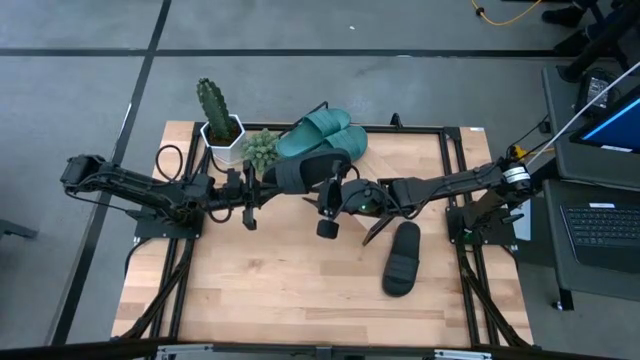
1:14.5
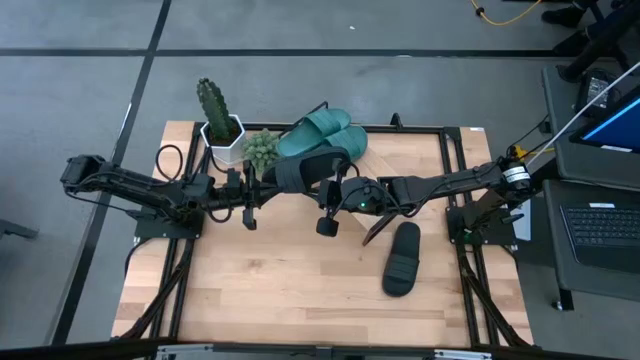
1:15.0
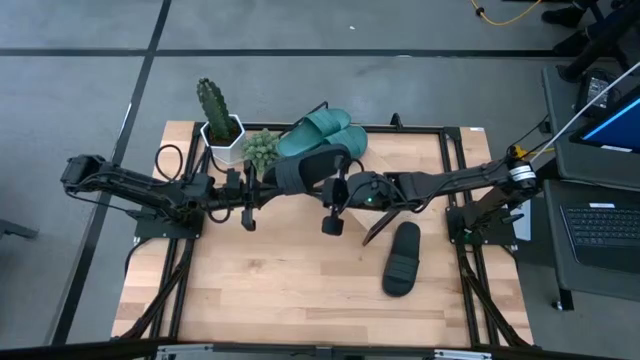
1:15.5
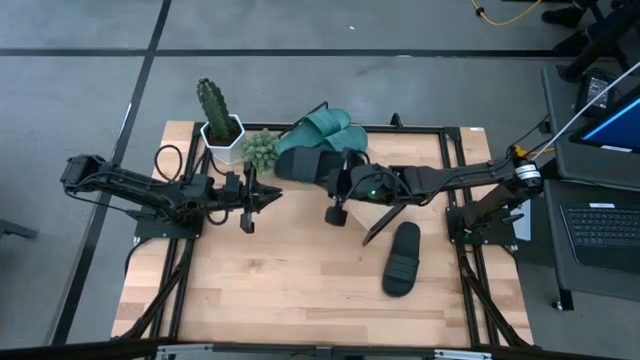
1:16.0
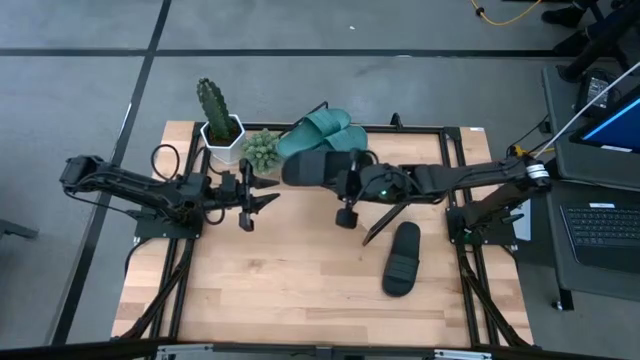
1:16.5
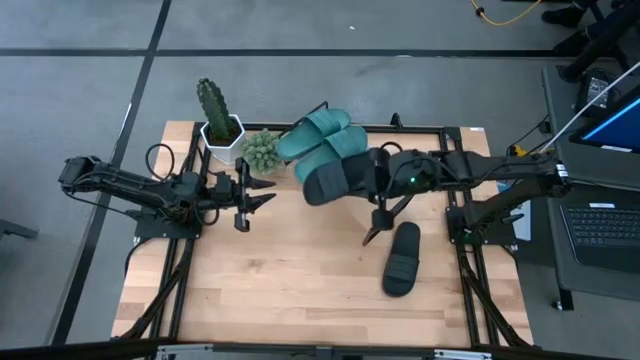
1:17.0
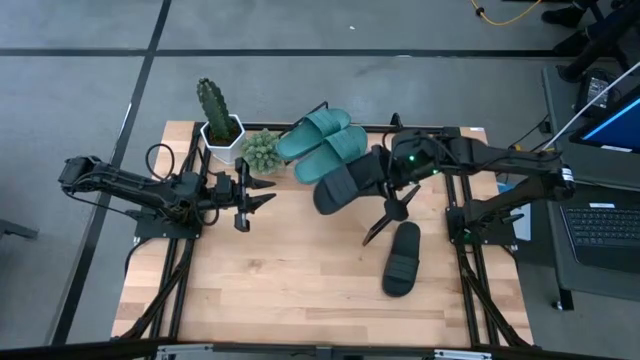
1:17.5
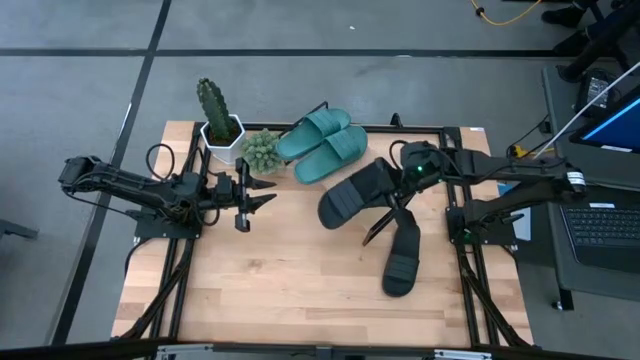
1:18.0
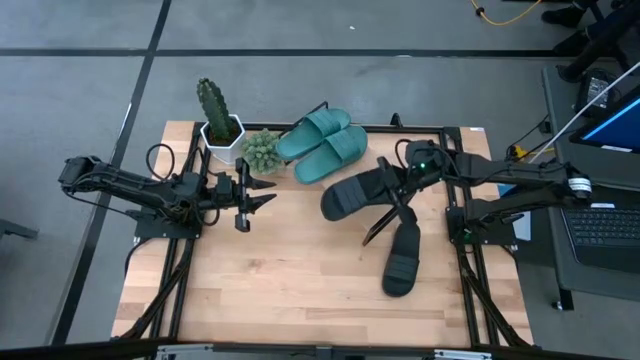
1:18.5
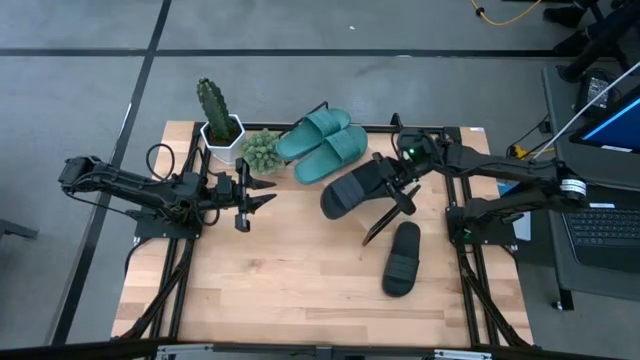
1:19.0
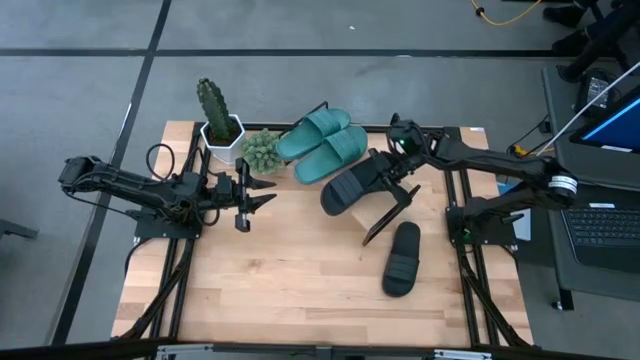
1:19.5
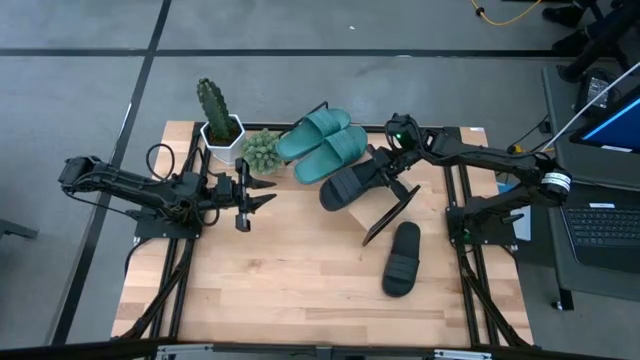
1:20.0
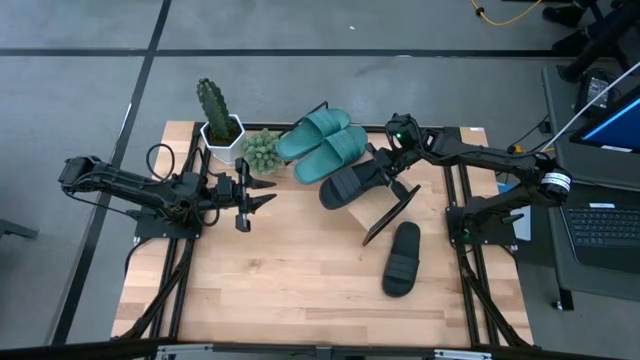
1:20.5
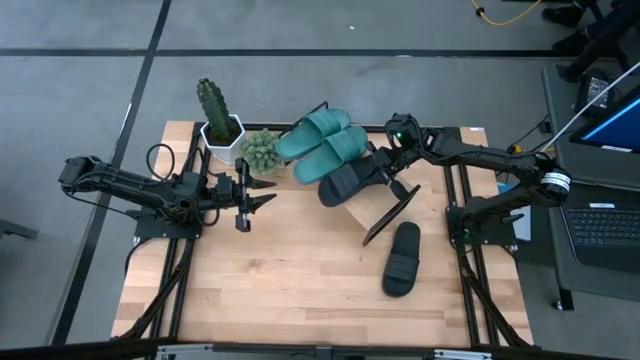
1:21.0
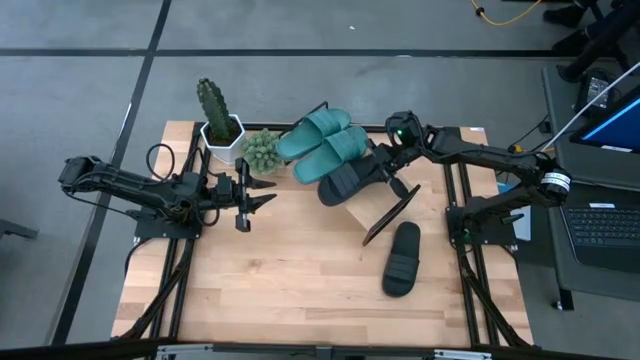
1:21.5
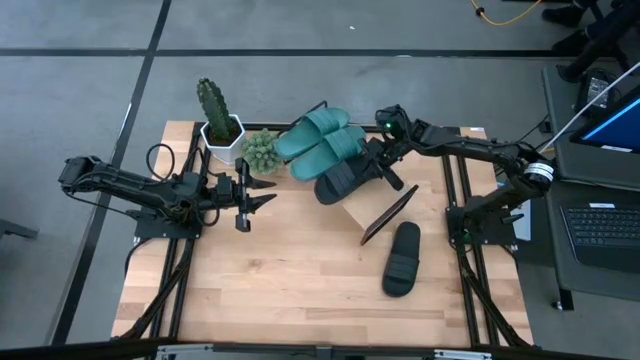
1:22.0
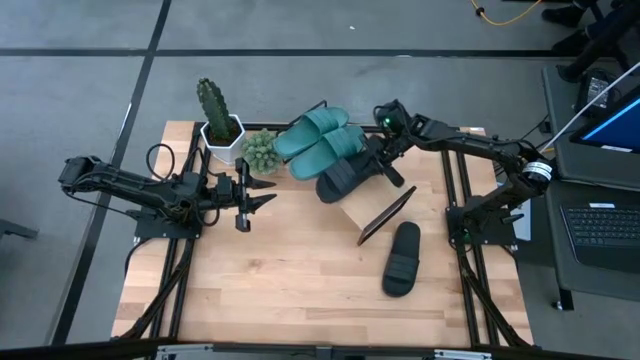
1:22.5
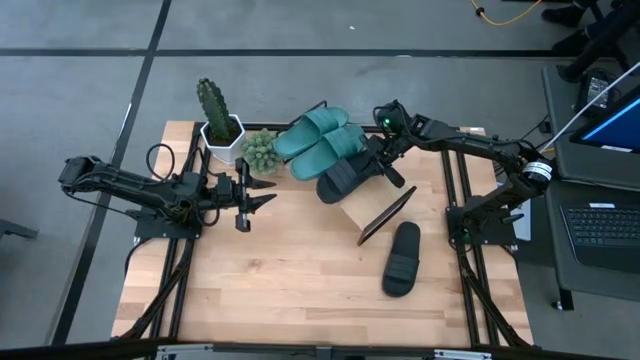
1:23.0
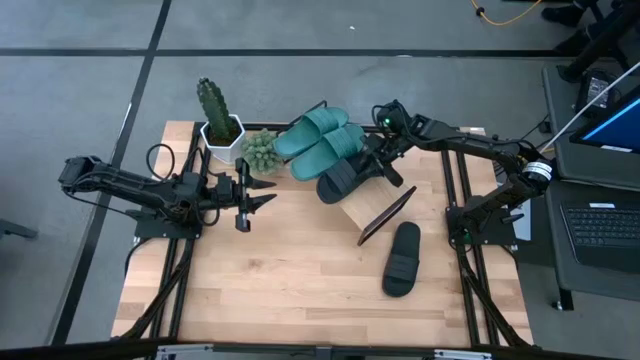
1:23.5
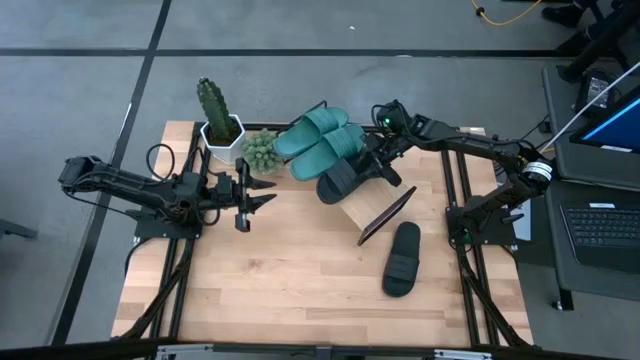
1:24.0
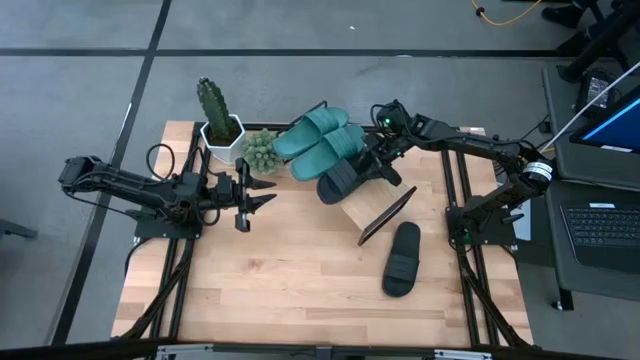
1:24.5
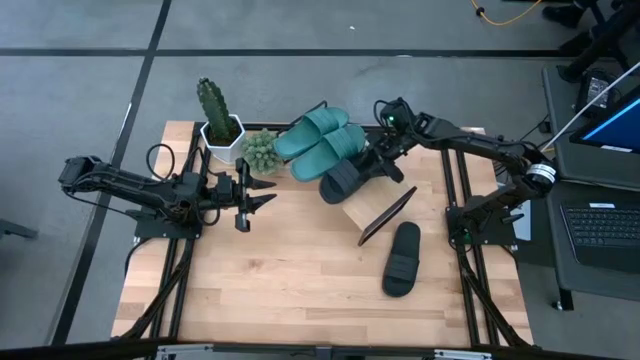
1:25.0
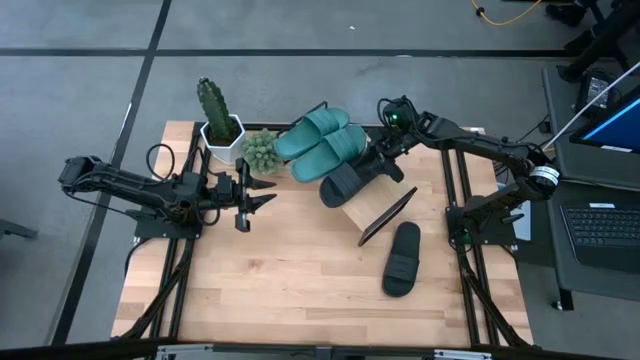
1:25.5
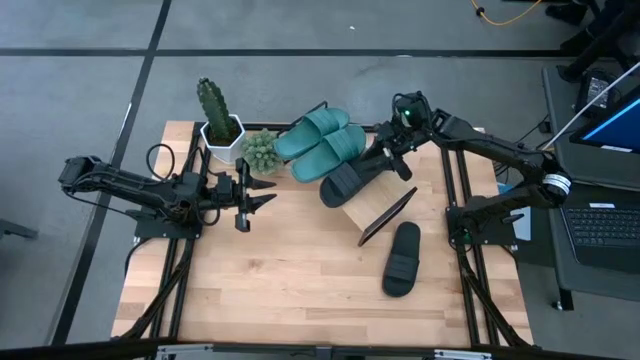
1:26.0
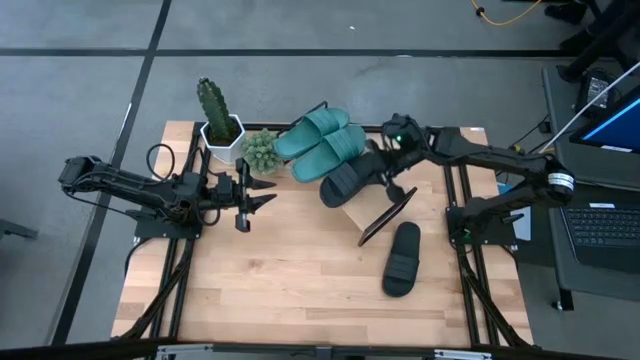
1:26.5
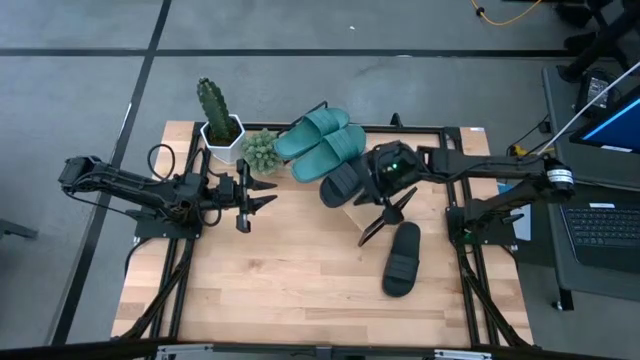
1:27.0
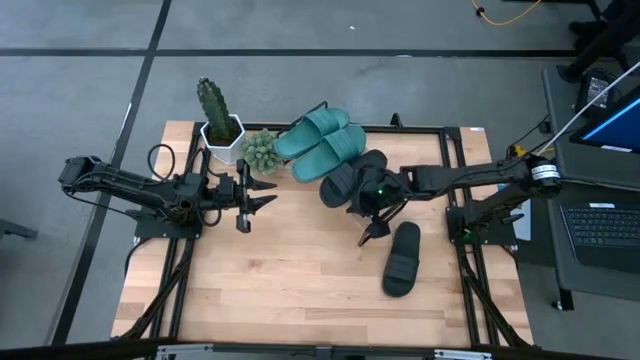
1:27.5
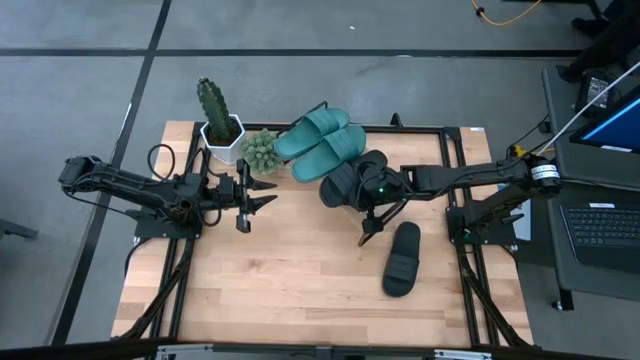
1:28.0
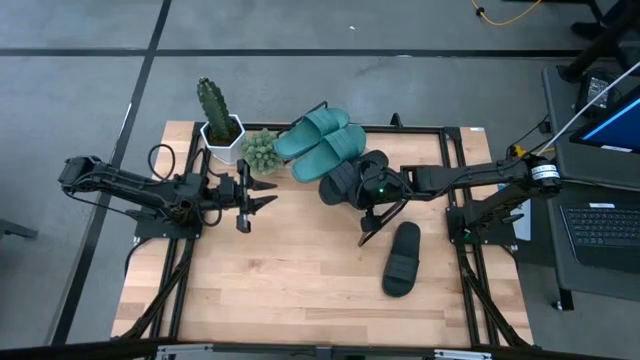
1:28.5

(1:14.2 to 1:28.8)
Task: Pick and place slides into the shelf
Put the top black slides on the shelf

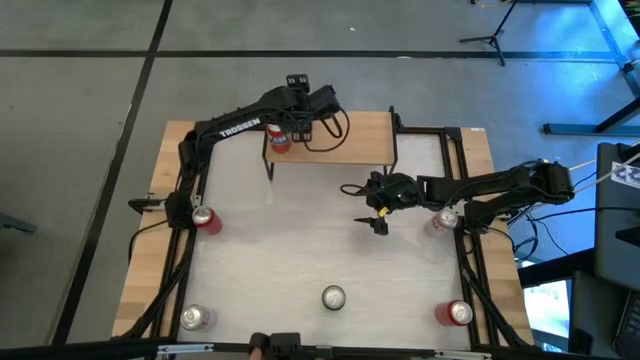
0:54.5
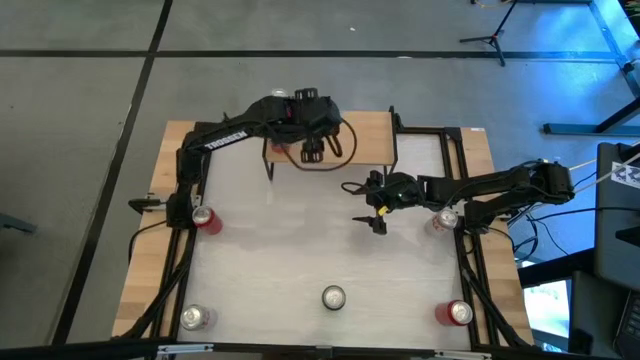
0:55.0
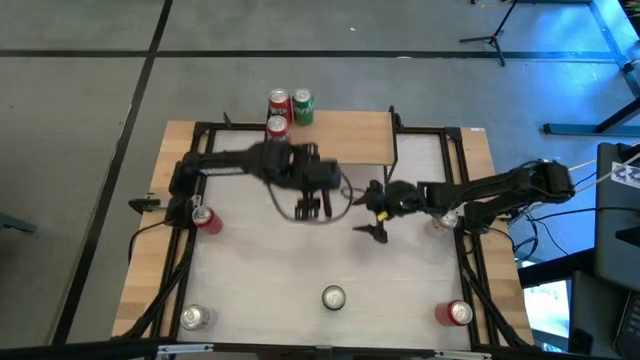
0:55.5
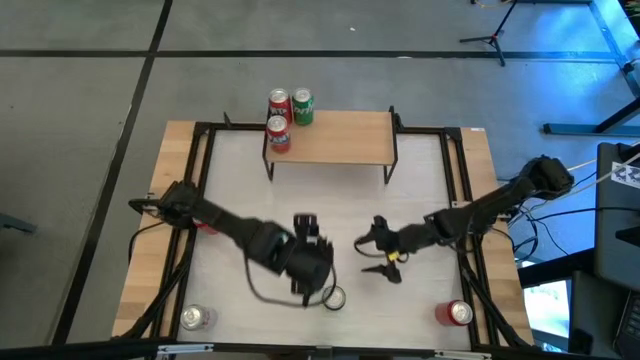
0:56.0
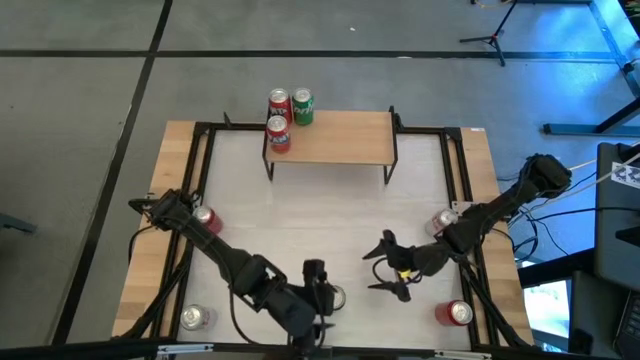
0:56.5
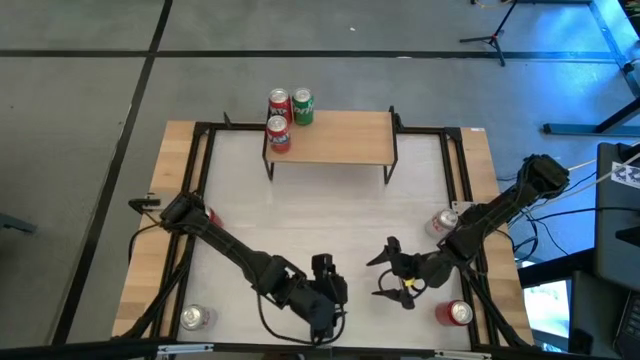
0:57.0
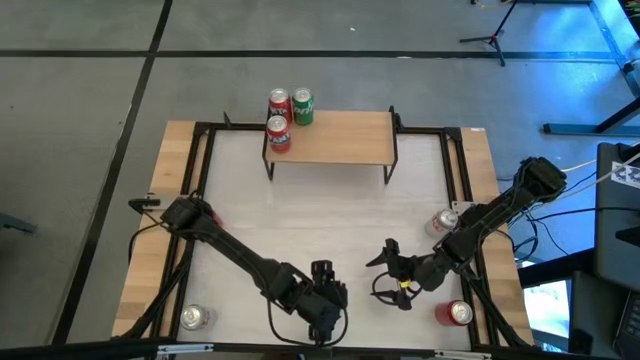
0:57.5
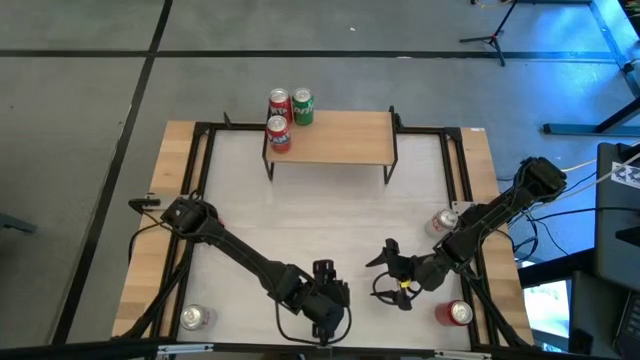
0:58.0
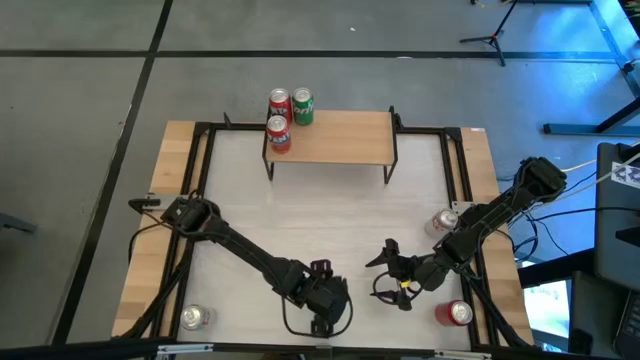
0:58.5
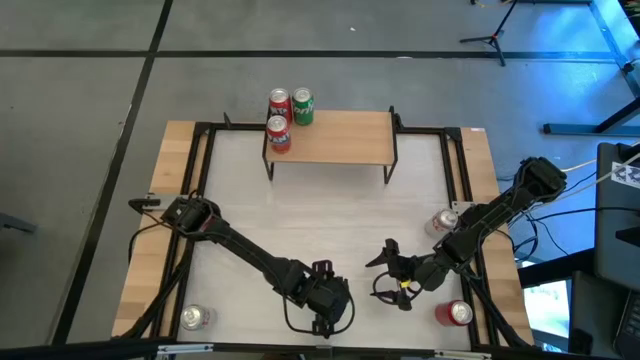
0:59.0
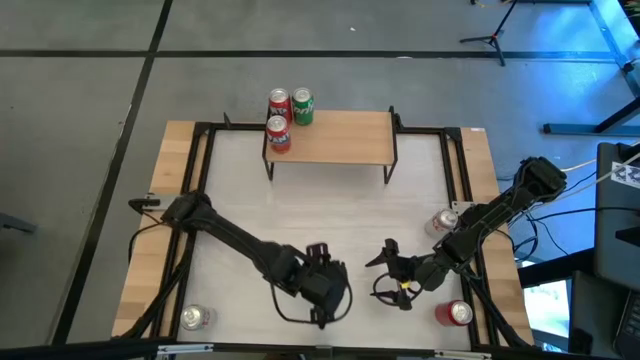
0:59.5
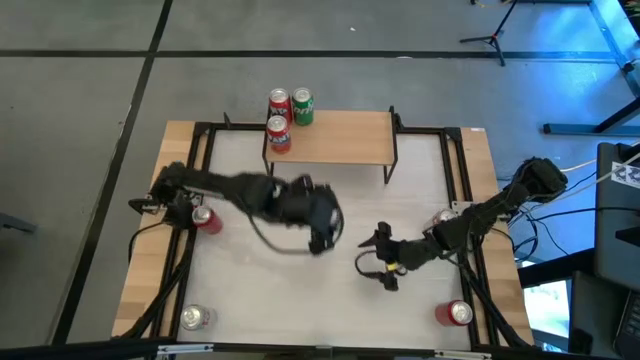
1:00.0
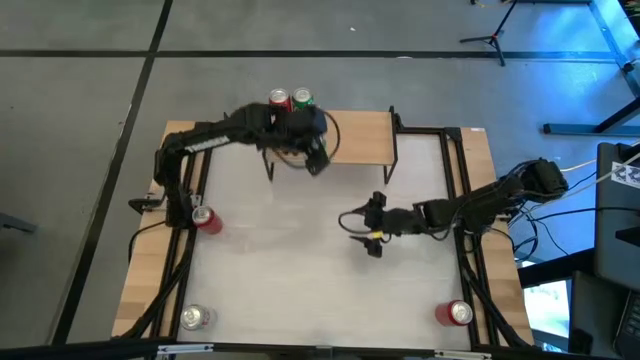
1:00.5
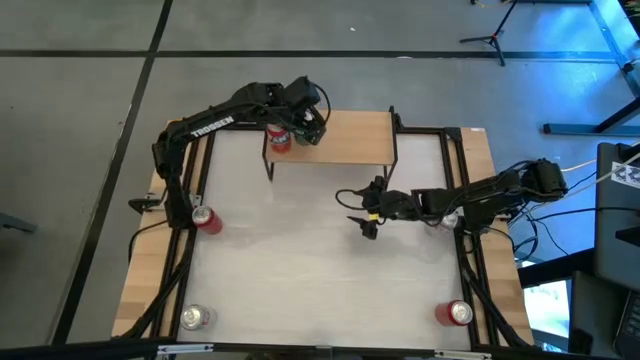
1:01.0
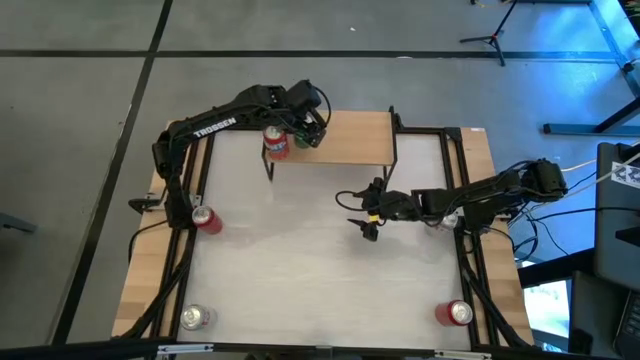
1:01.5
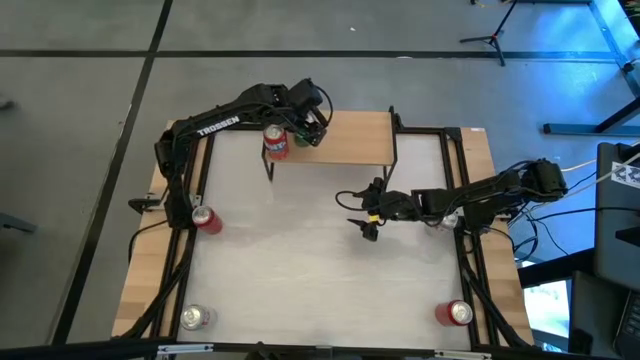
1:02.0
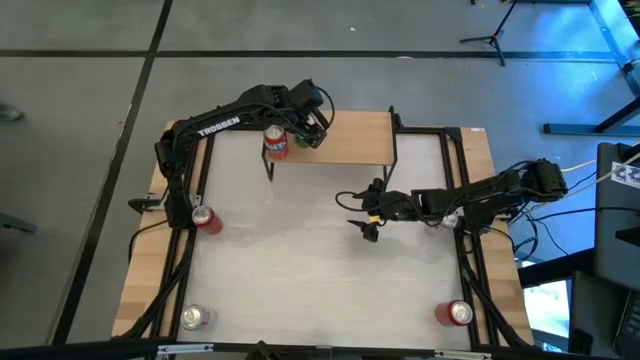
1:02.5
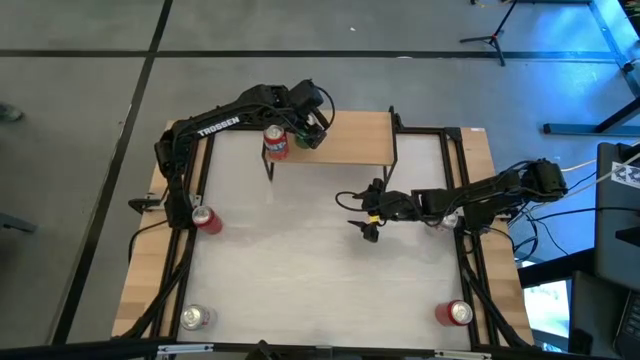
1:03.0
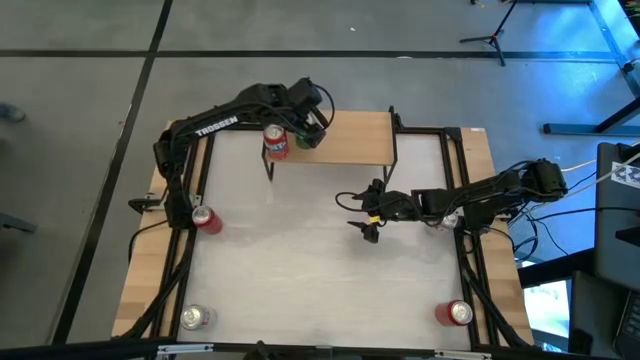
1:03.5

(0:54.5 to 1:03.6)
Task: Place canned beverage on shelf
Put the green soda can aligned with the other green soda can on the shelf
